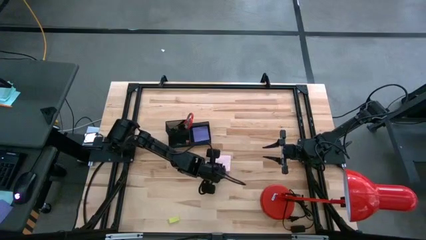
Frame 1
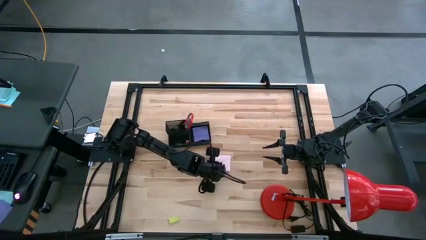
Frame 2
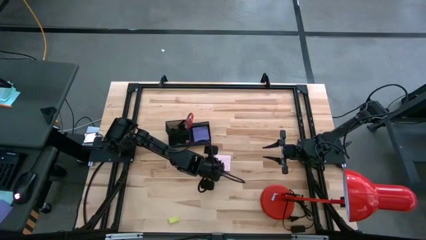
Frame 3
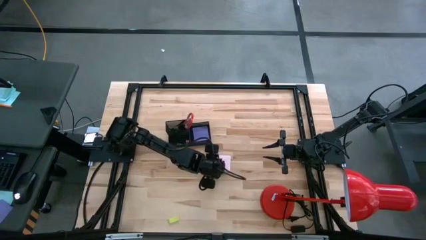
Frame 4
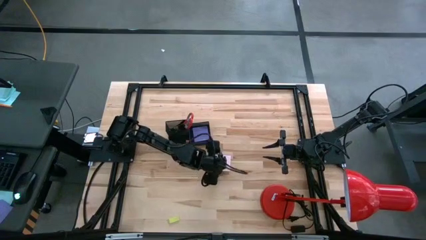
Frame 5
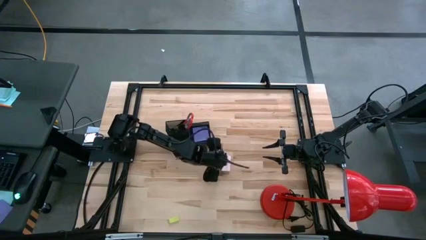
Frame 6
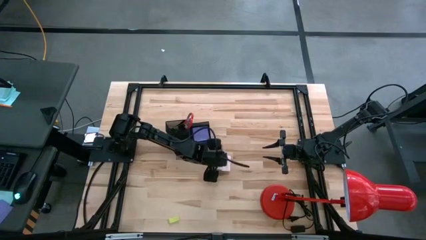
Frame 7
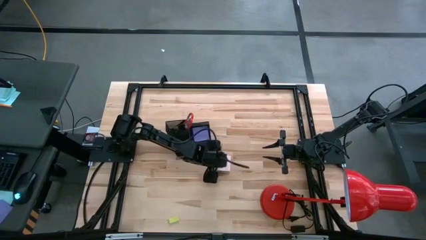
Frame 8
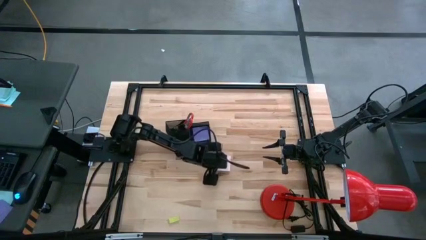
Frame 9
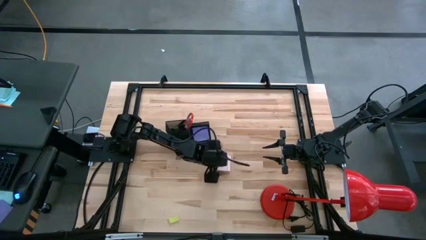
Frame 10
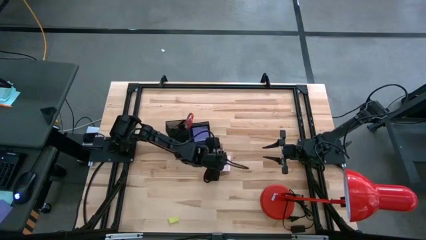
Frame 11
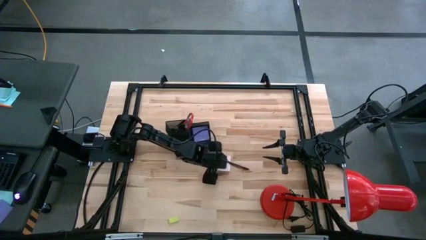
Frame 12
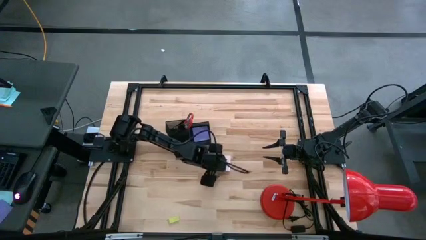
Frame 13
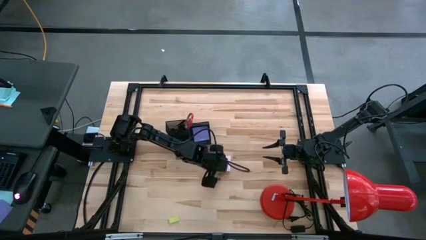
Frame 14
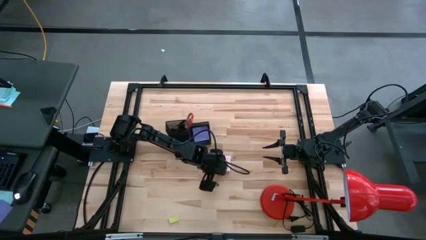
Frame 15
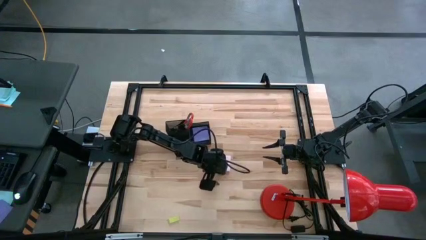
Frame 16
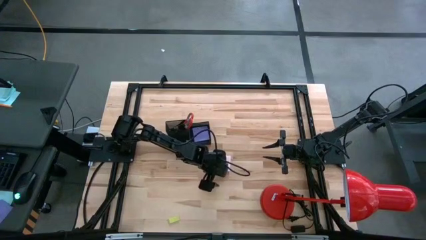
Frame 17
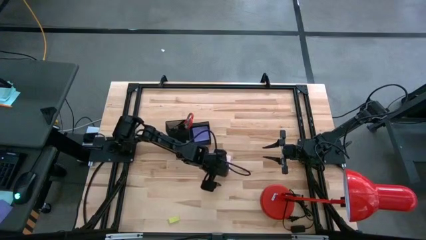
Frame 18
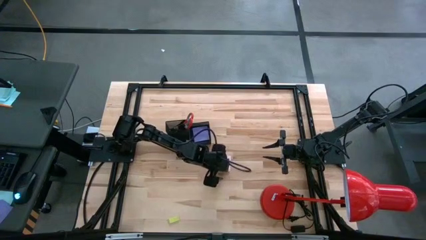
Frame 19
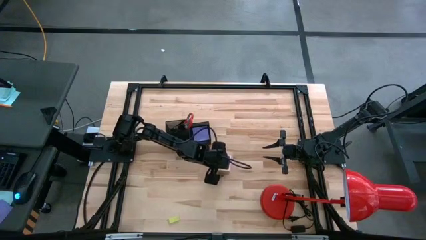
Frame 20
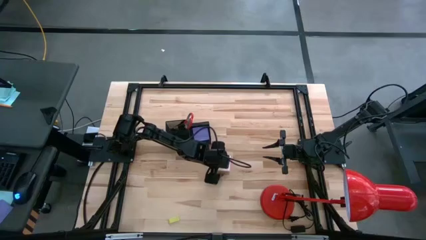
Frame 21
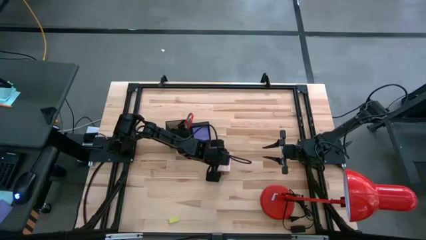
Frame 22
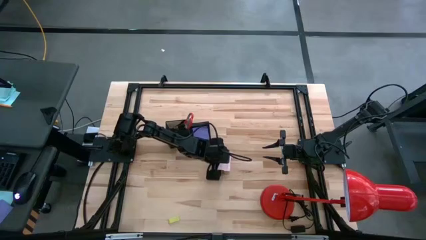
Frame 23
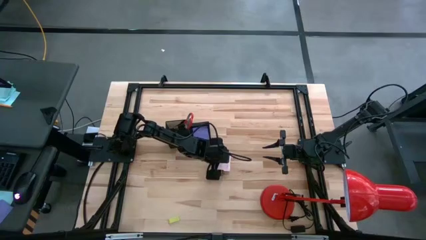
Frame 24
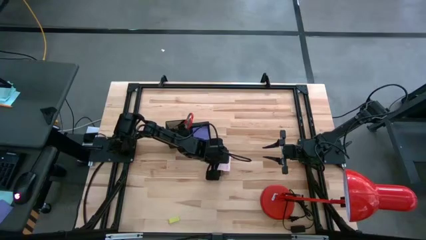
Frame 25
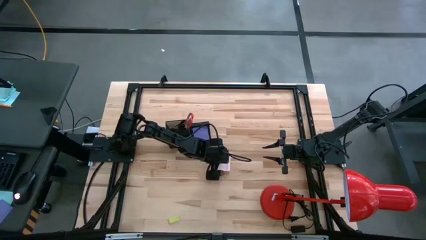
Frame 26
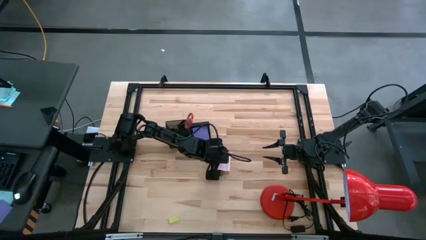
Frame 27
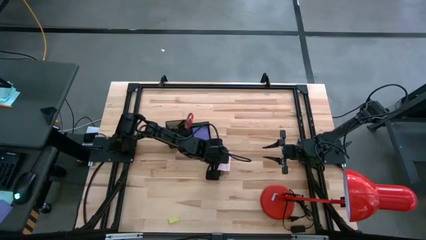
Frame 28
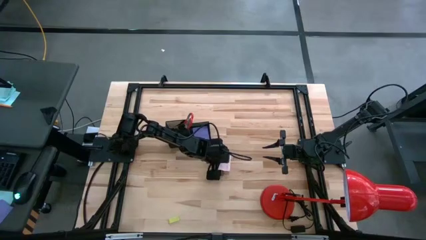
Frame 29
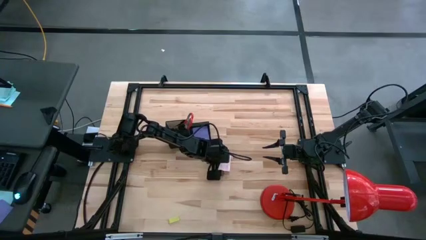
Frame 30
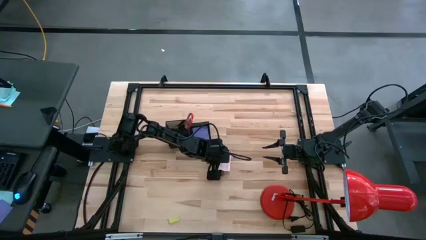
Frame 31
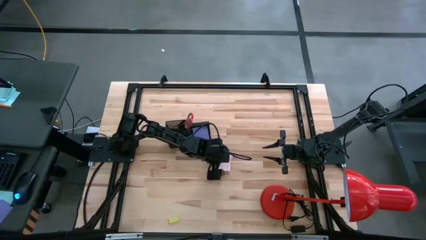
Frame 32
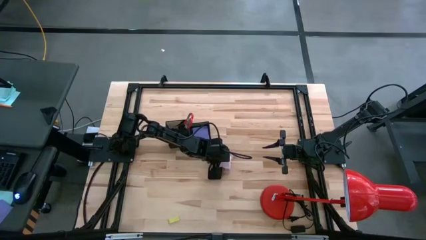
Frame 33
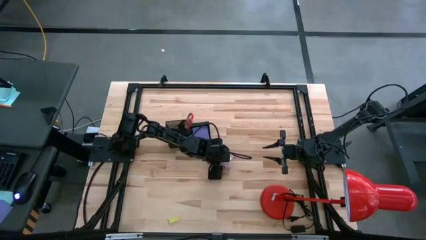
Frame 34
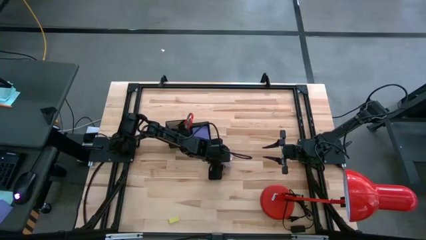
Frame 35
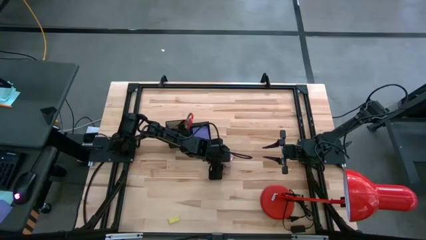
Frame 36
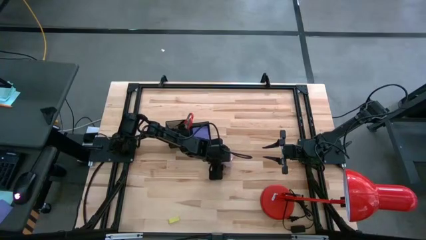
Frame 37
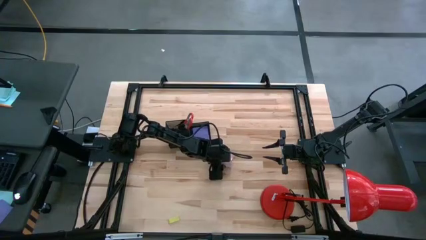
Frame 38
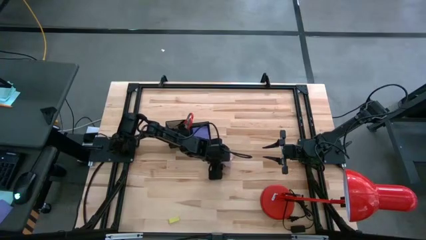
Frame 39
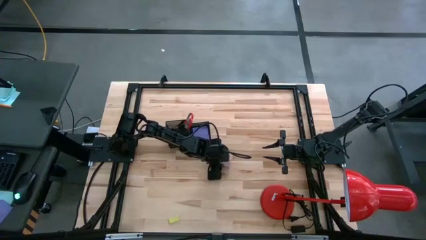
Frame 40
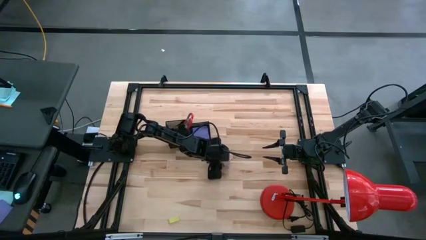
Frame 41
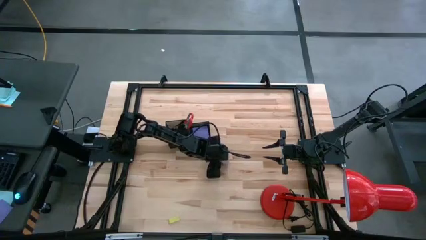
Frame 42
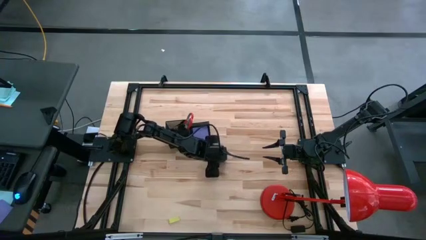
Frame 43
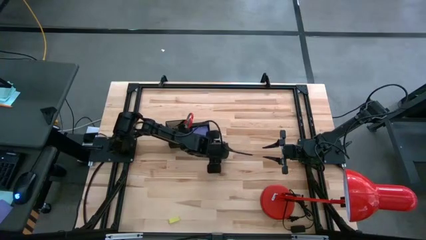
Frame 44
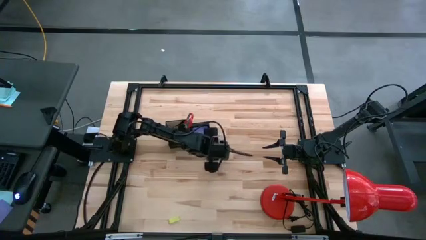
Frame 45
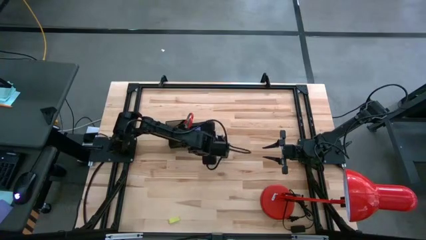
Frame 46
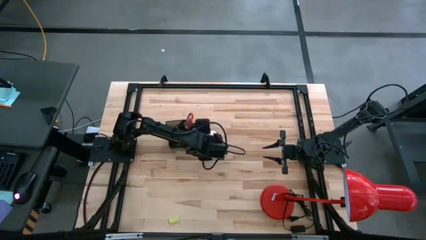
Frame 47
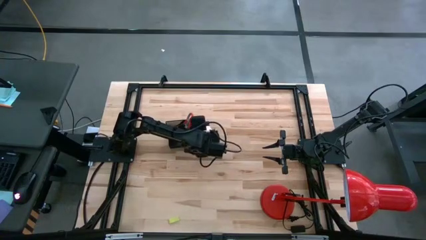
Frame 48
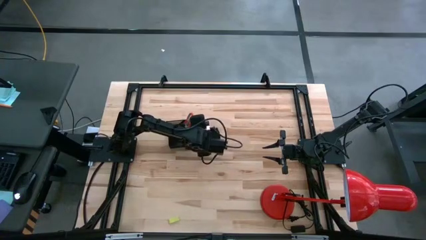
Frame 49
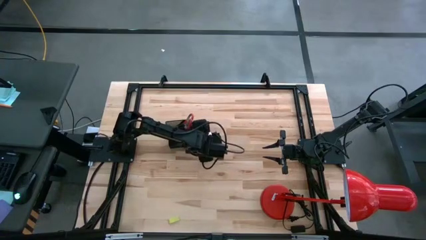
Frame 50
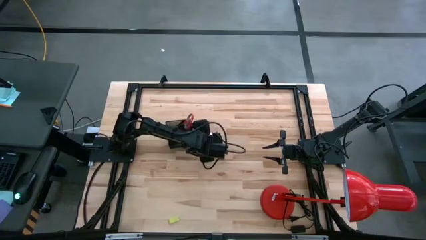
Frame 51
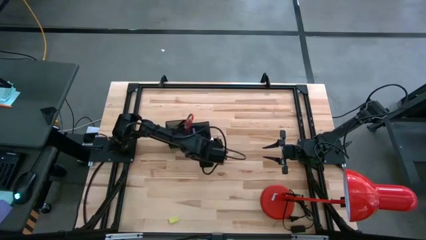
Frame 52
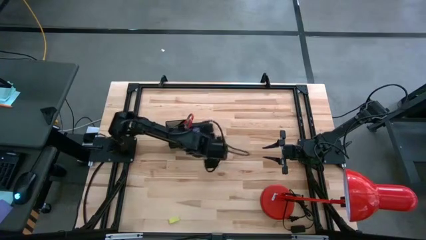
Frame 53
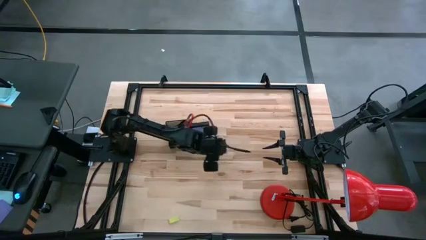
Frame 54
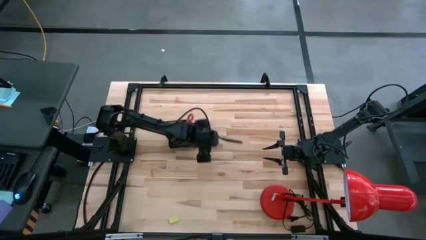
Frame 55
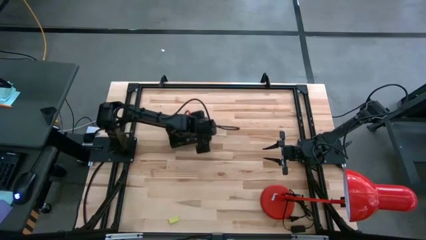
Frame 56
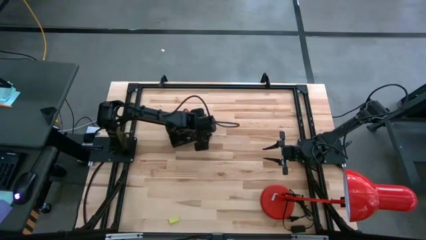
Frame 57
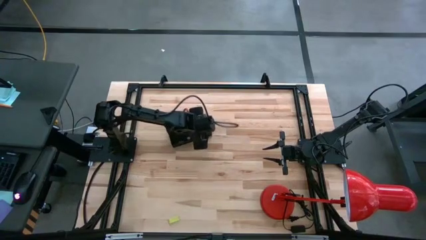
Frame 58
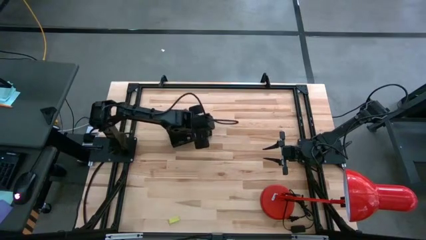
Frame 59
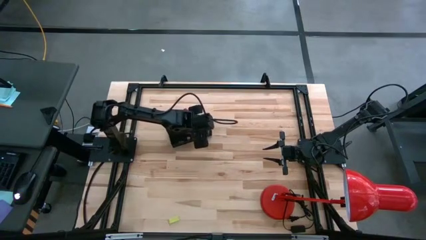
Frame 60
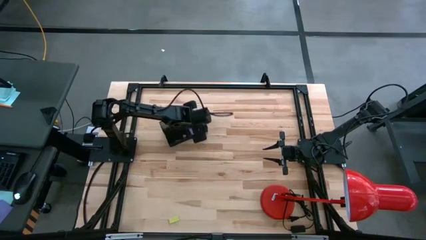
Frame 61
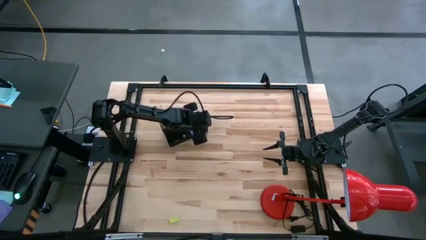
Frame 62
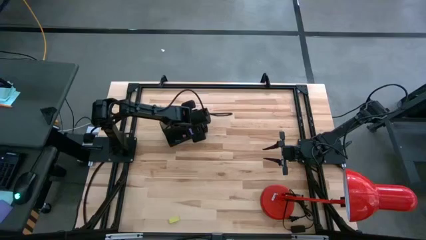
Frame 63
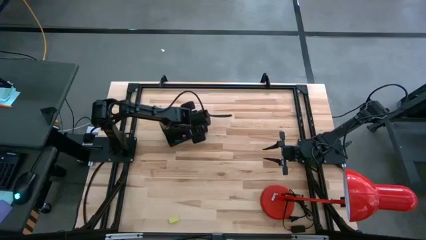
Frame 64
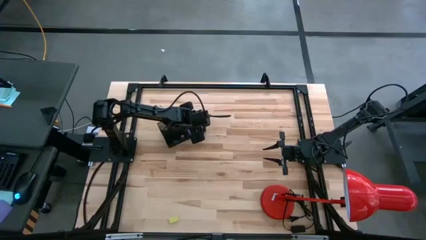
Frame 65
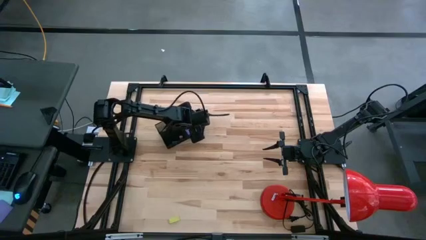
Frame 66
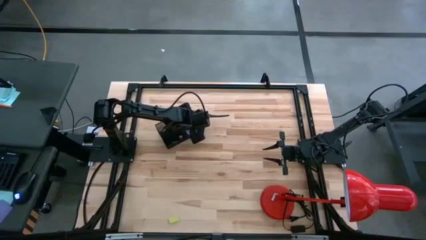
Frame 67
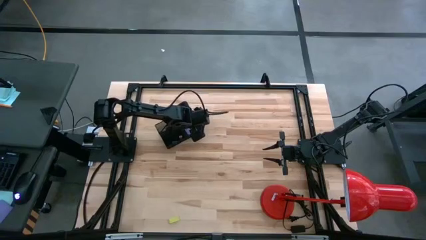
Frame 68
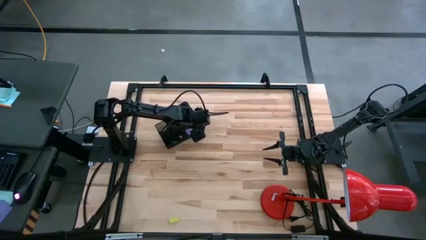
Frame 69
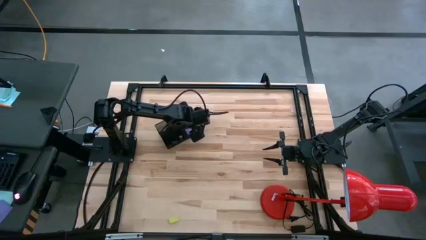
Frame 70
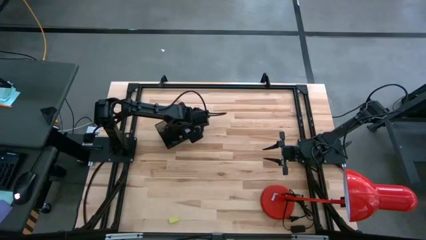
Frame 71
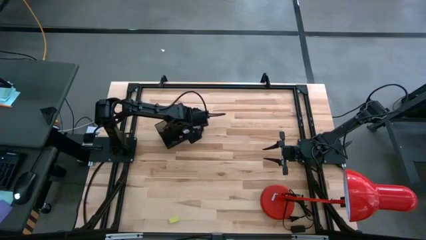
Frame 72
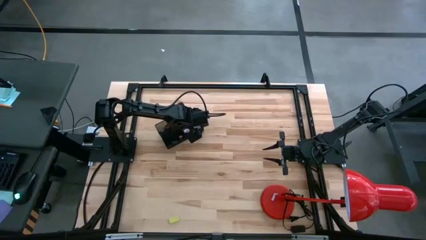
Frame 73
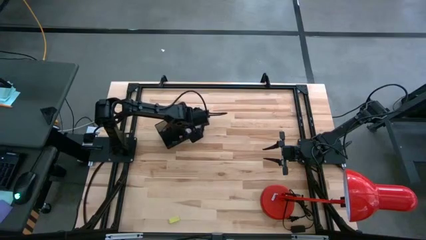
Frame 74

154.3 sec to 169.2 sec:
Task: Pick and place office supplies into organizer
Put the pink sticky note into the desk organizer
